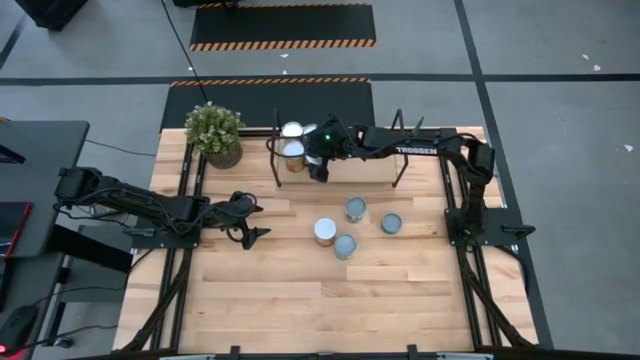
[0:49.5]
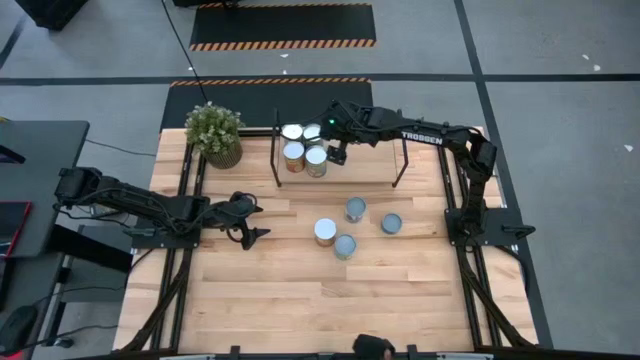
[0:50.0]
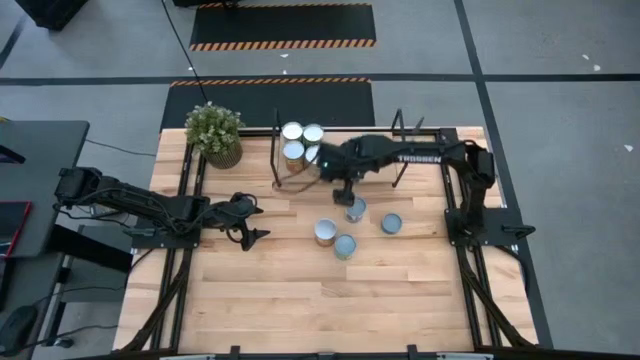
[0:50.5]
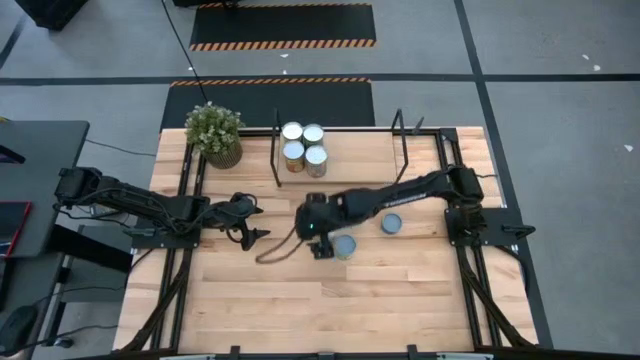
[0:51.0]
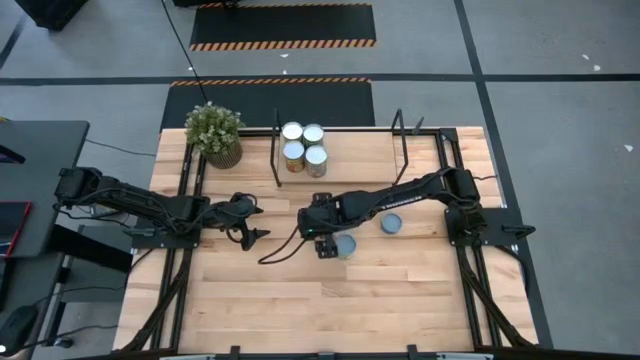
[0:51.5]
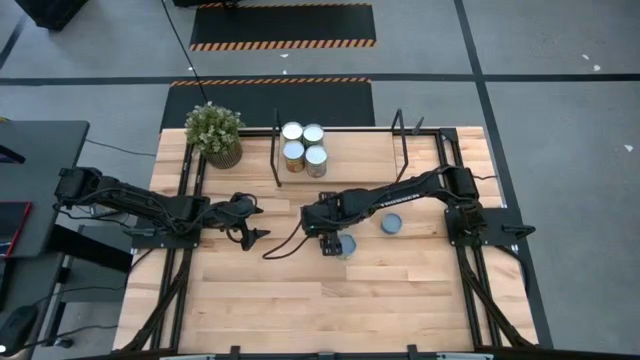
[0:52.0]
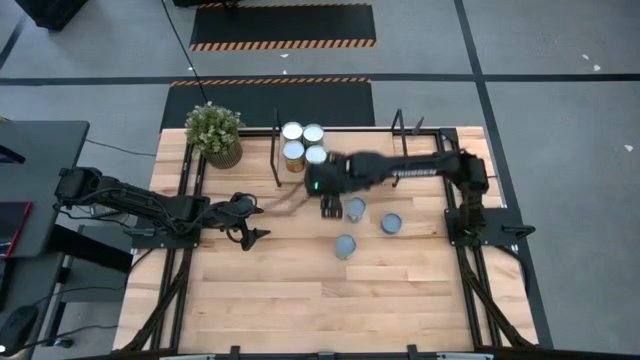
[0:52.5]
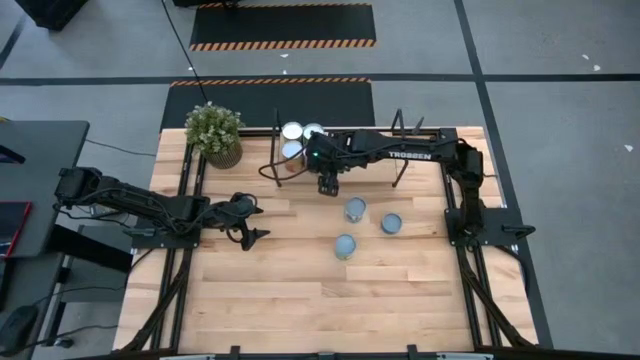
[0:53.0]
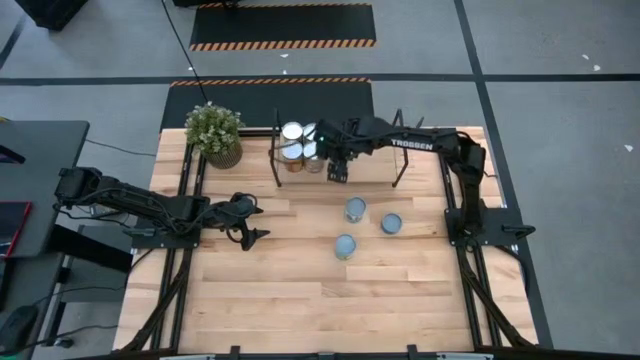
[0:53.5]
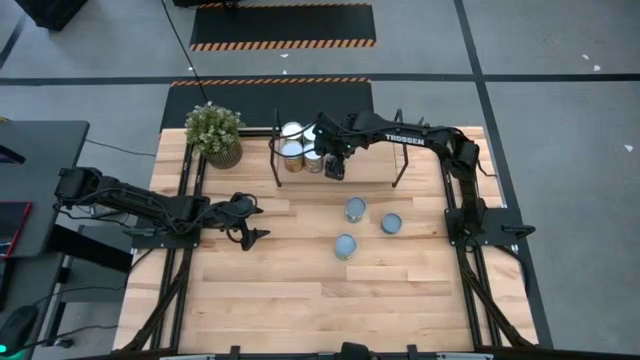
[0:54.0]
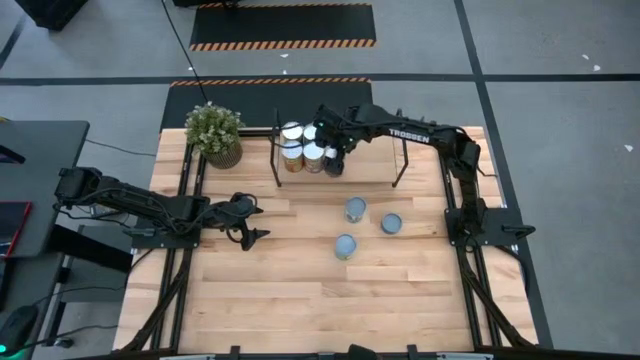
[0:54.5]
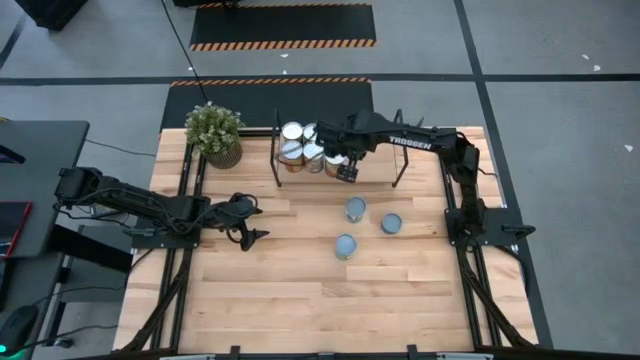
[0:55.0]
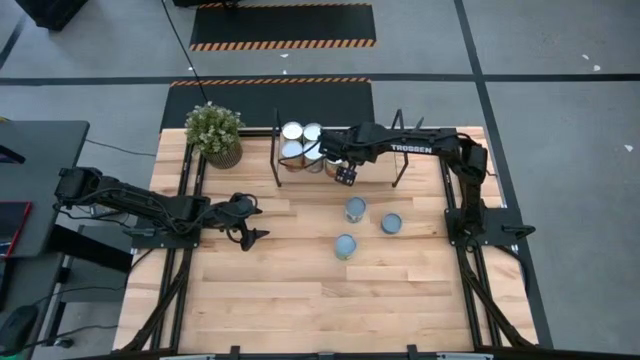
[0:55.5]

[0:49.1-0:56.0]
Task: Pick and place cans onto a shelf
Put the canned corn on the shelf

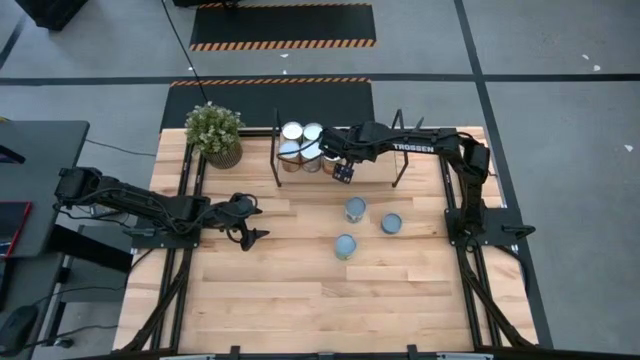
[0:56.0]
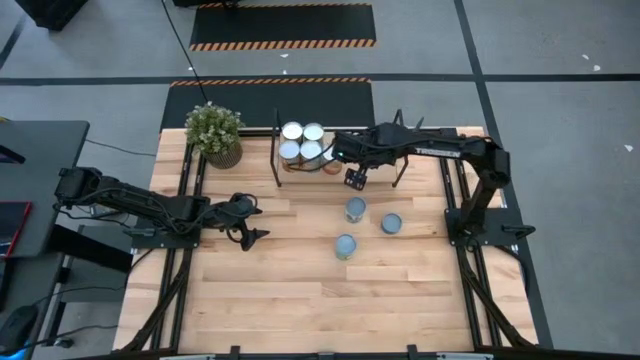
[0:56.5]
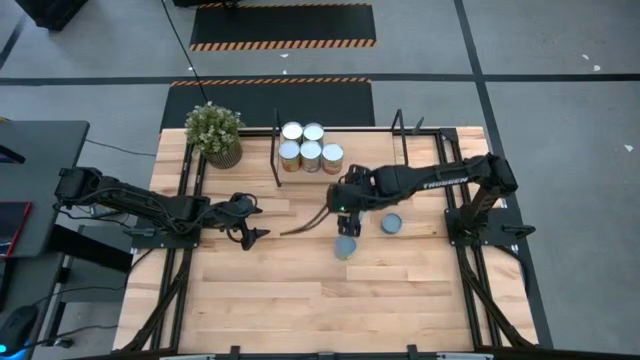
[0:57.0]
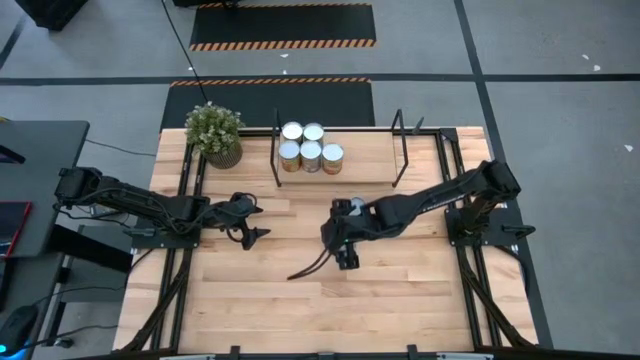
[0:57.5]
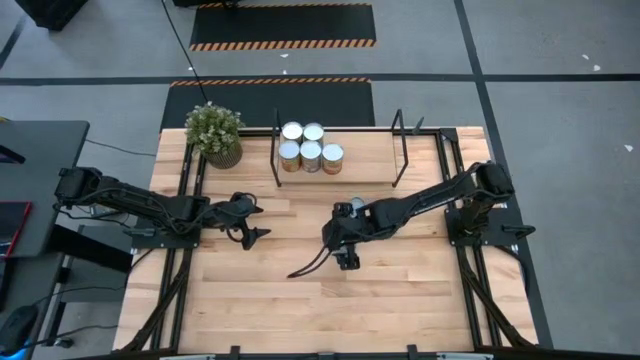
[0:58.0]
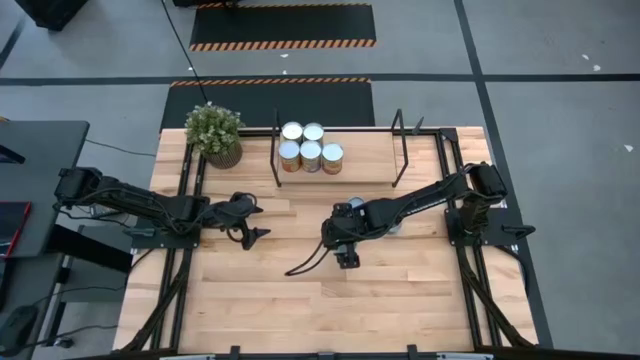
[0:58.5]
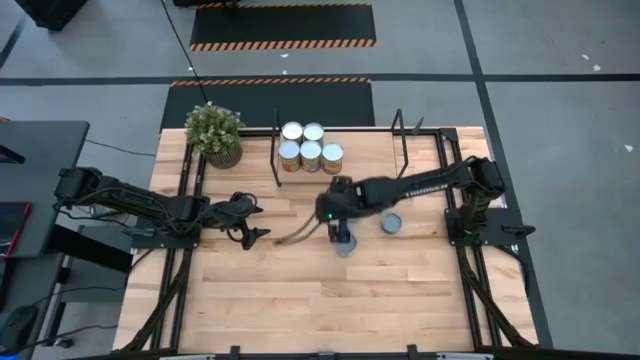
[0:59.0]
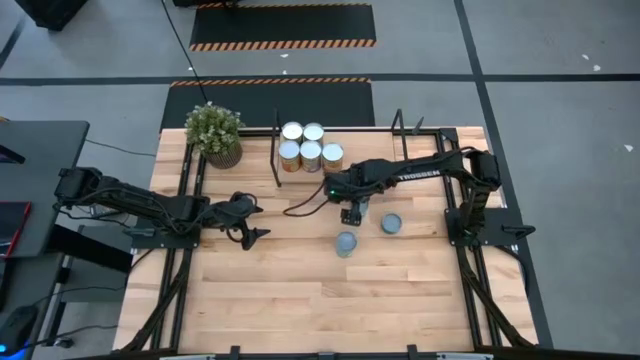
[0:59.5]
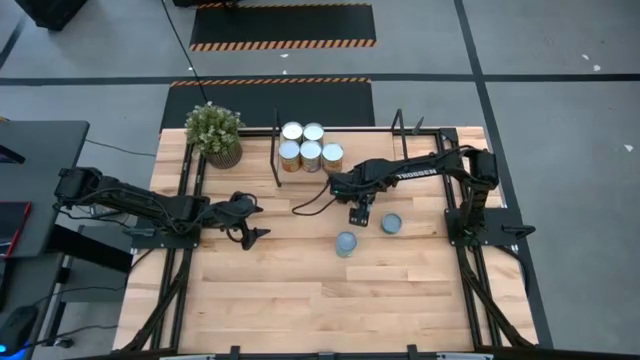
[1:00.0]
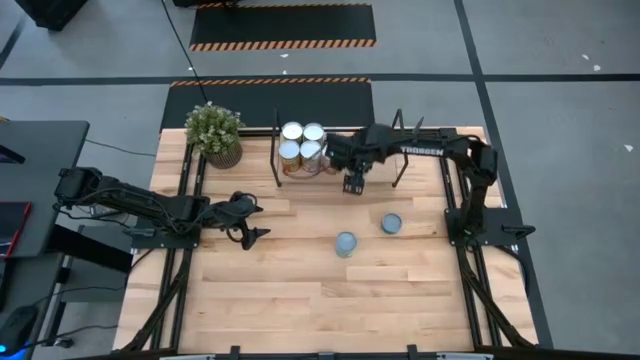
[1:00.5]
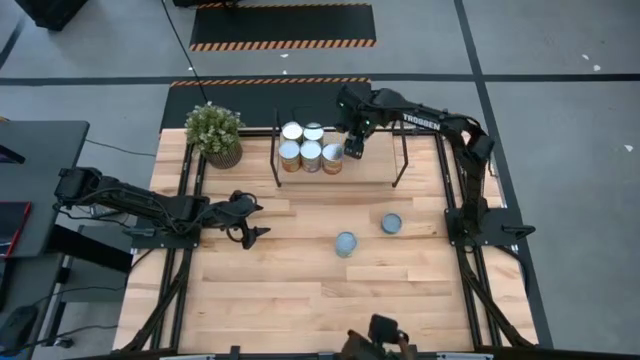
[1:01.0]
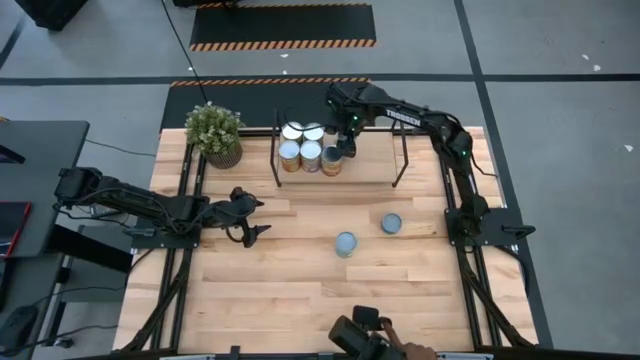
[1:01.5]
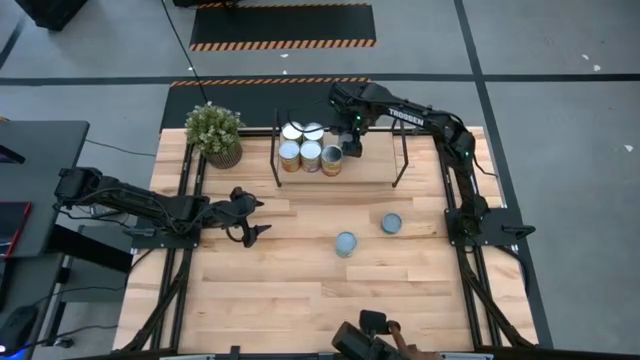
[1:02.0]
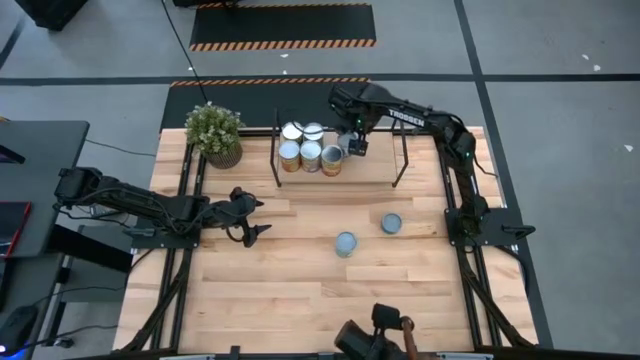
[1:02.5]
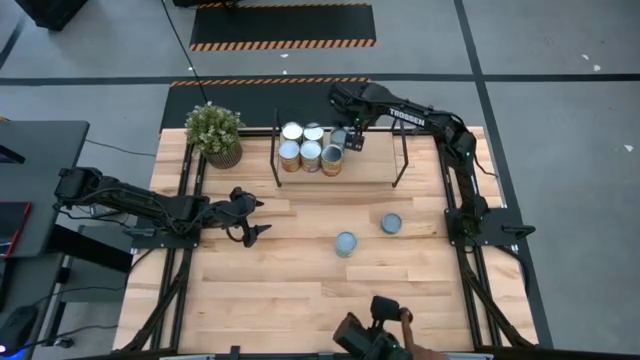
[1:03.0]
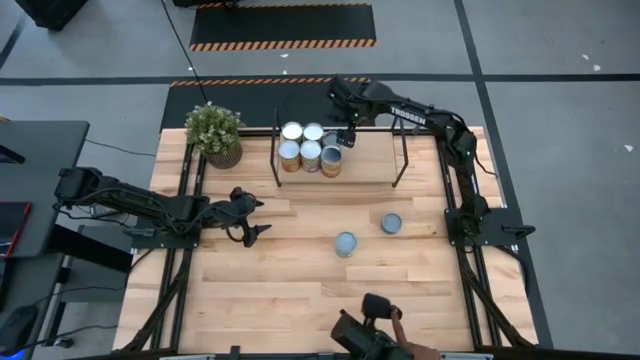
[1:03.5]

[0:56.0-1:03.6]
Put the canned mixed vegetables on the shelf

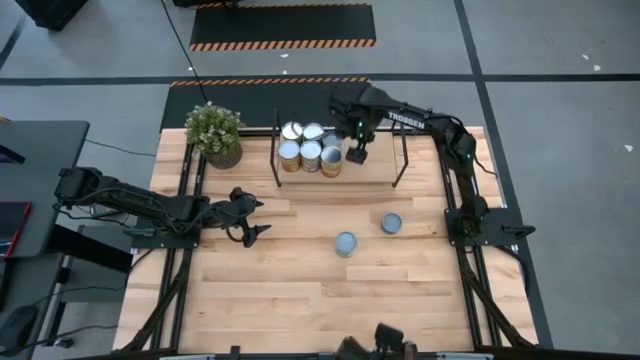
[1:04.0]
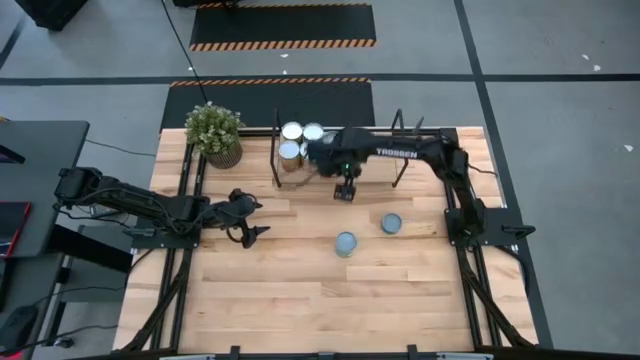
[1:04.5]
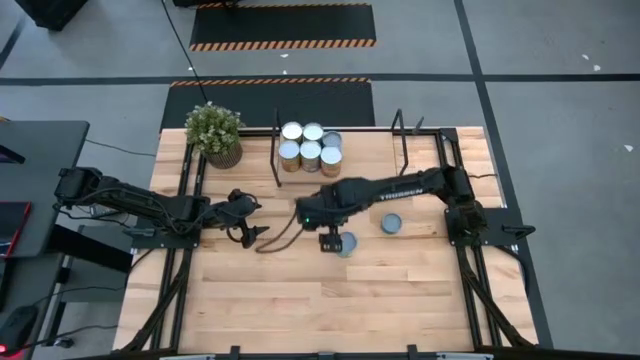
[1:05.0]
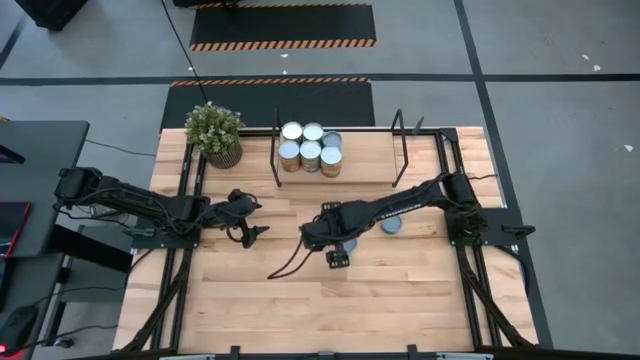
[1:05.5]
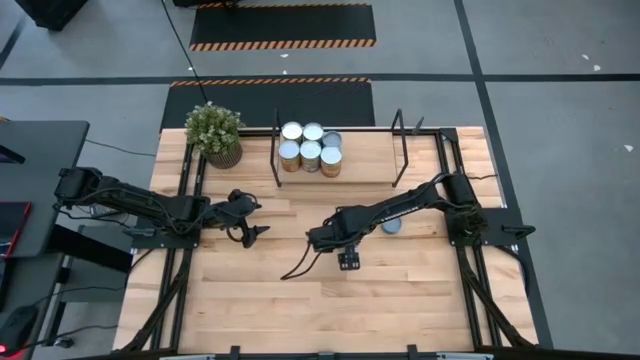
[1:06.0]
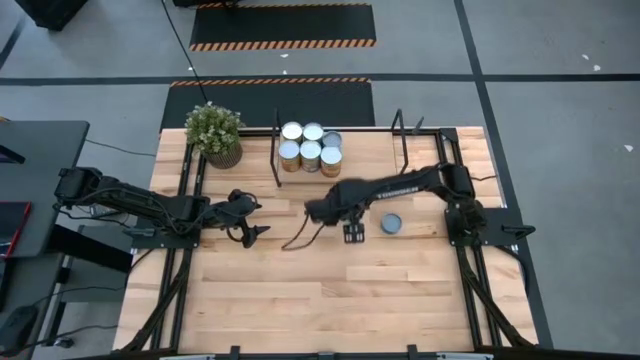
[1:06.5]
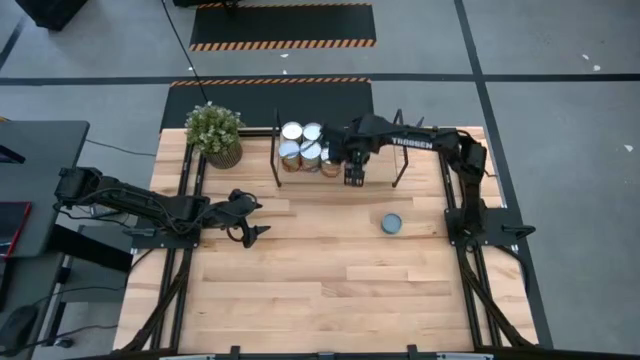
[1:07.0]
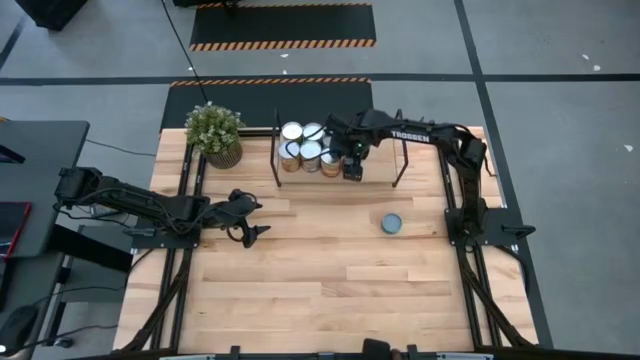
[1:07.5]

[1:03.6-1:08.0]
Put the canned chicken soup on the shelf

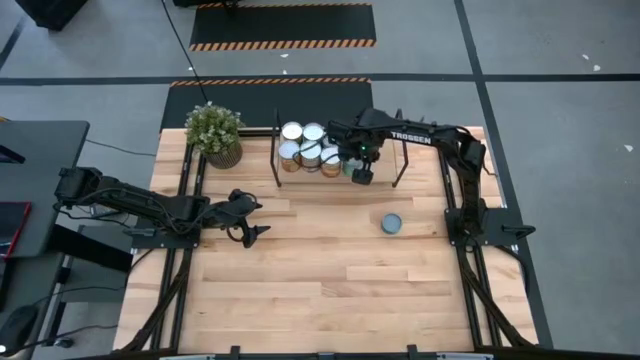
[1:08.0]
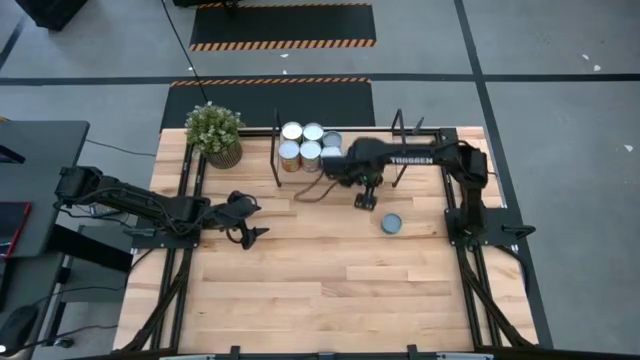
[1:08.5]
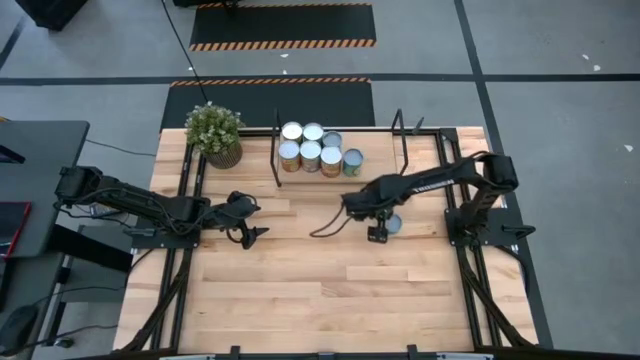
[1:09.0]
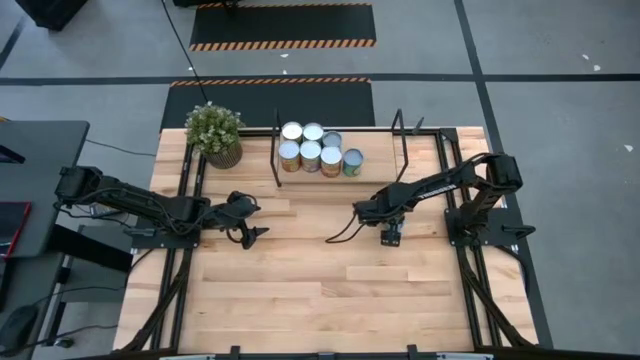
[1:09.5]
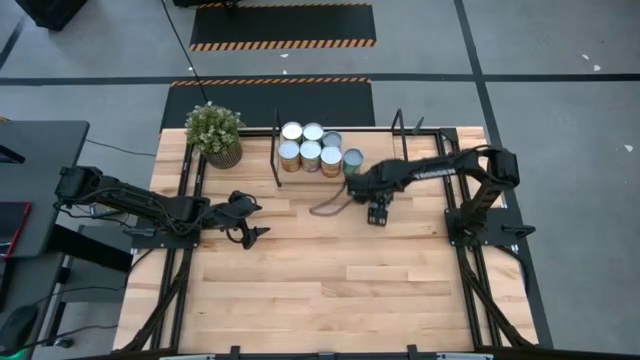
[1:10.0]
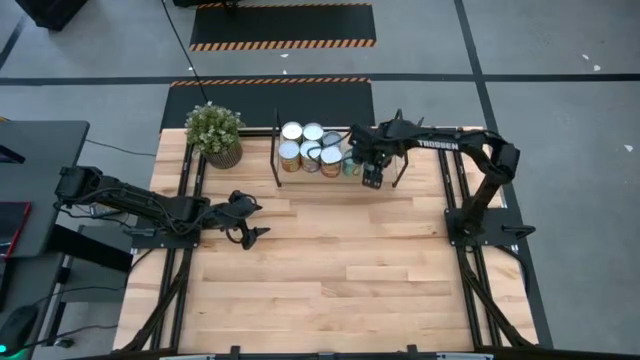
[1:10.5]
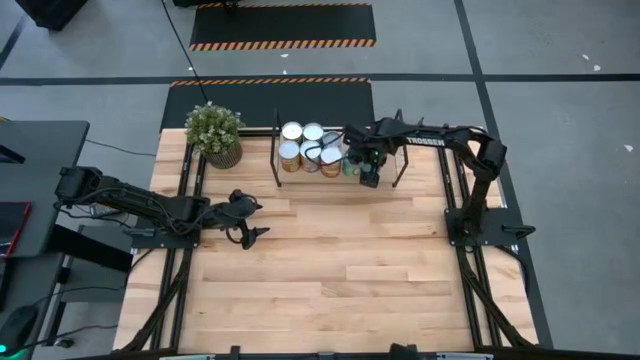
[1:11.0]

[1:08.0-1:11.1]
Put the tuna can on the shelf
